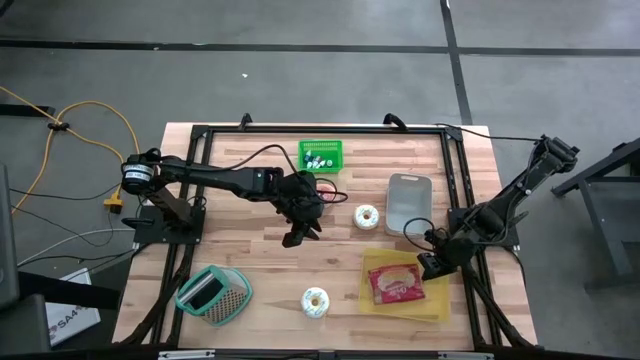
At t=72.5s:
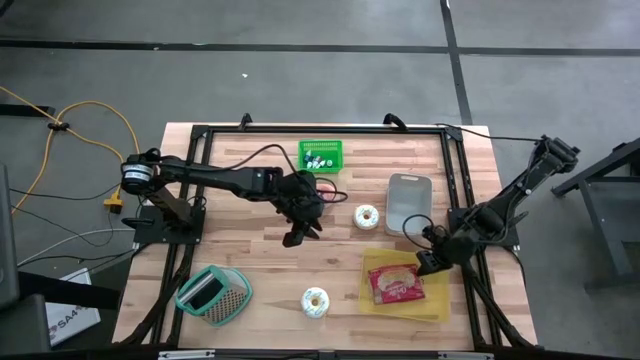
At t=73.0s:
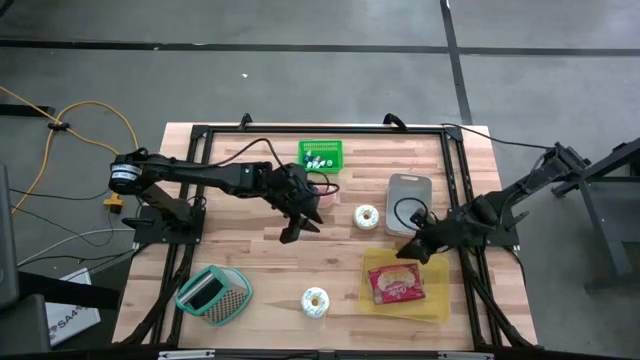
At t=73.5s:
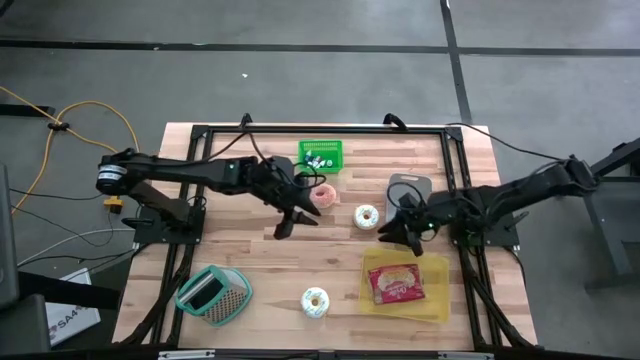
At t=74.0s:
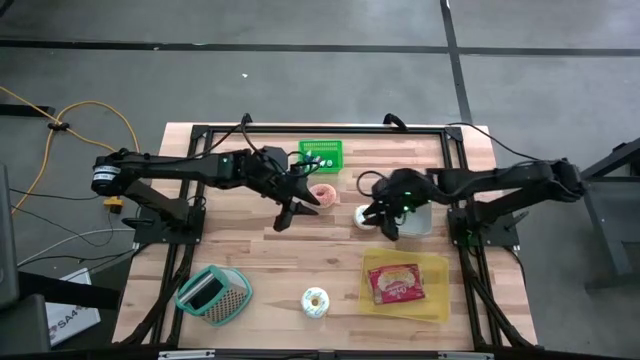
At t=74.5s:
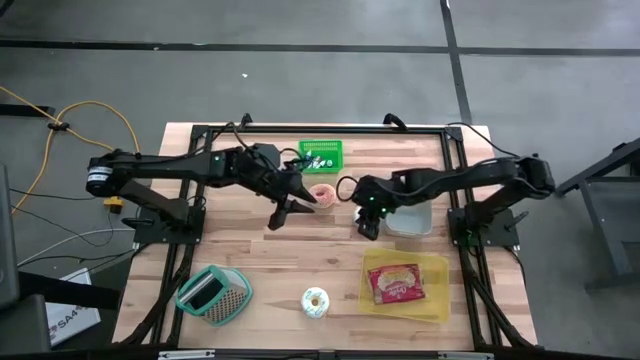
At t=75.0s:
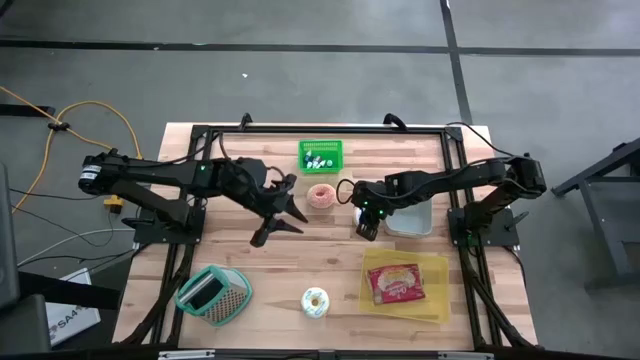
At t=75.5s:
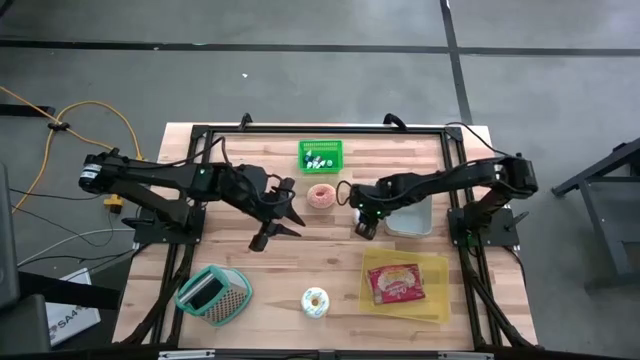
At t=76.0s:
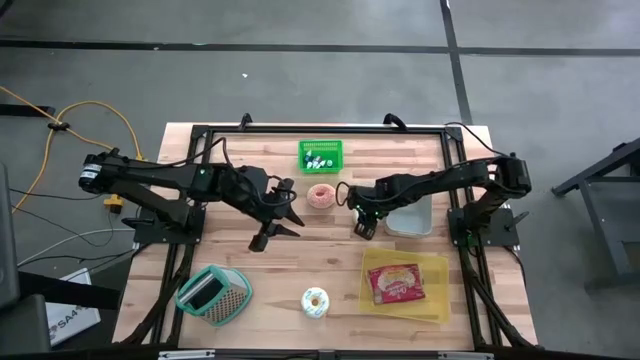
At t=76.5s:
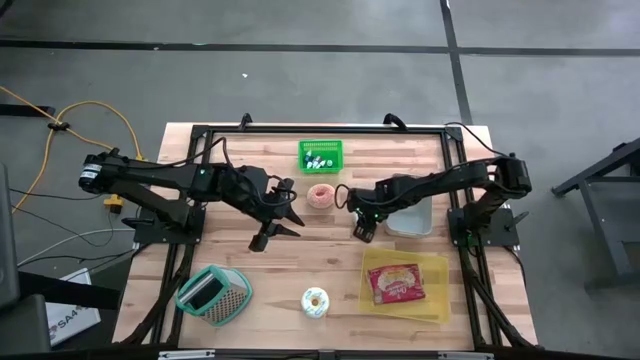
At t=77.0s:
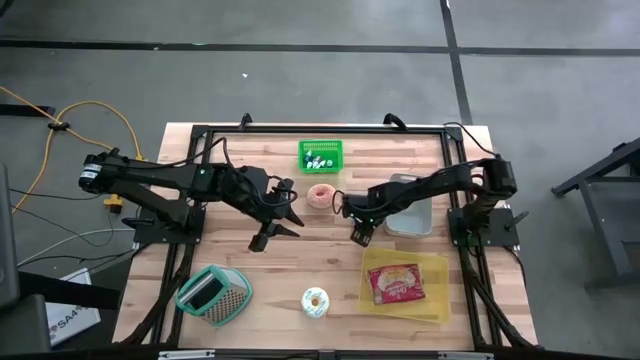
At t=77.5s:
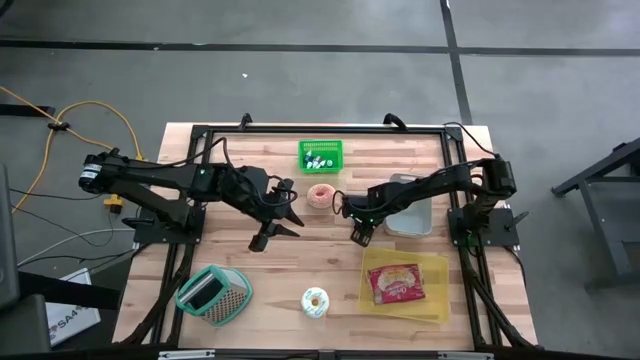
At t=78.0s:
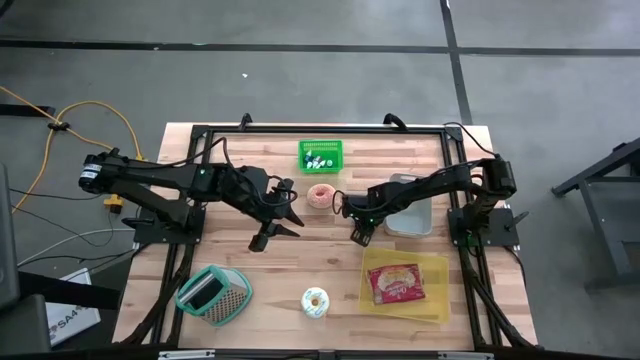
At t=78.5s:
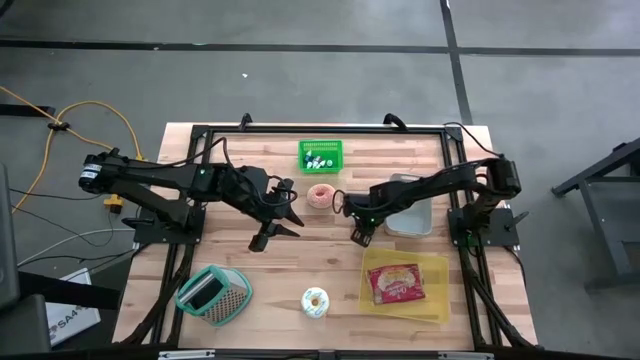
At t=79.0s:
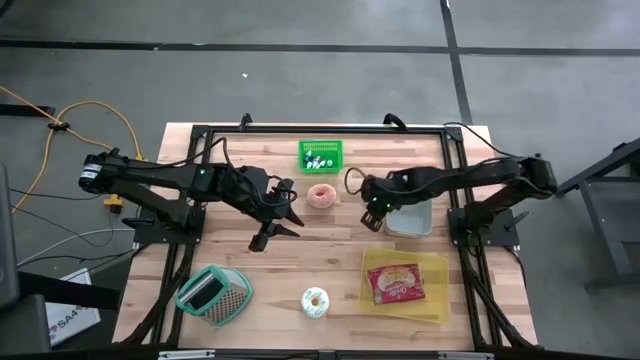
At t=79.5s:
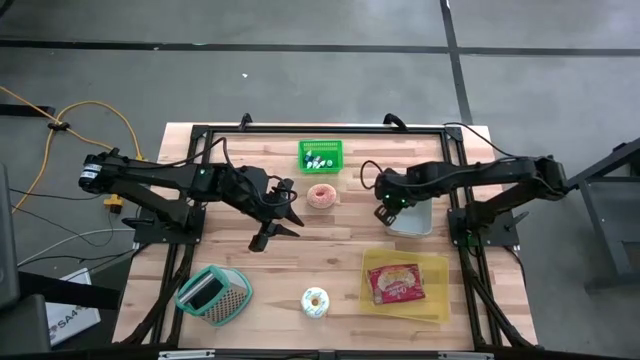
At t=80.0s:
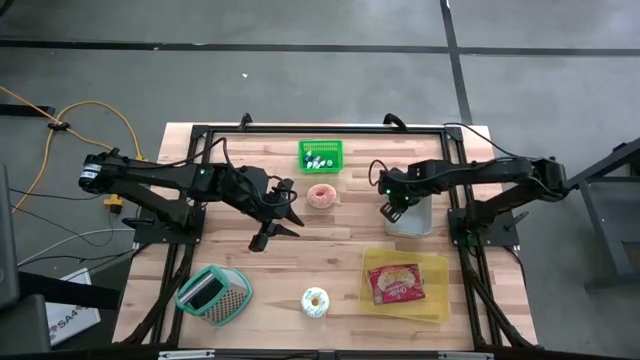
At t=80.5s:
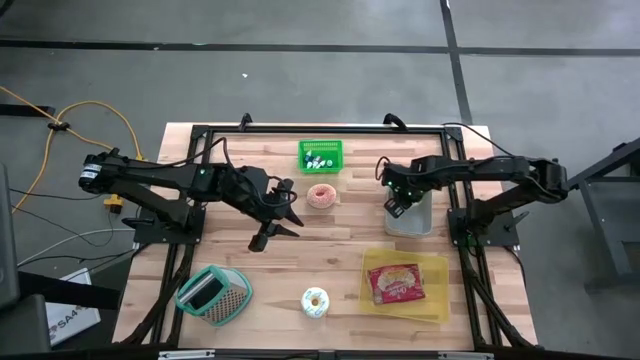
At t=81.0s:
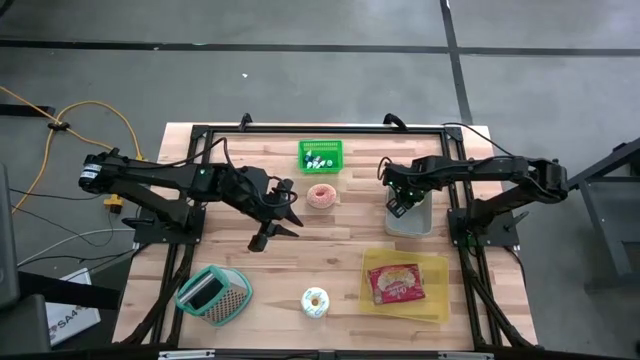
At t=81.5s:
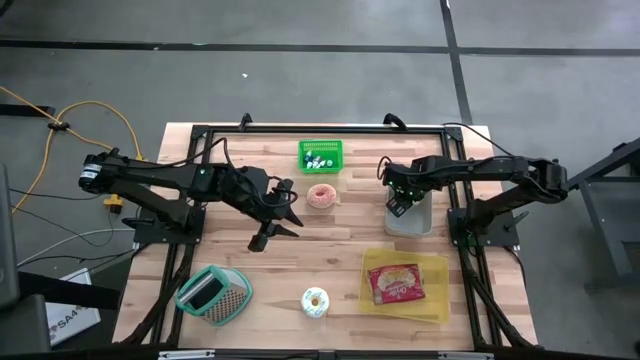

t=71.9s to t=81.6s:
Put the top white donut into the gray bin

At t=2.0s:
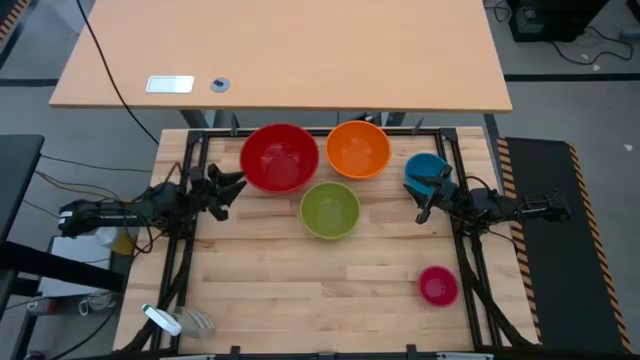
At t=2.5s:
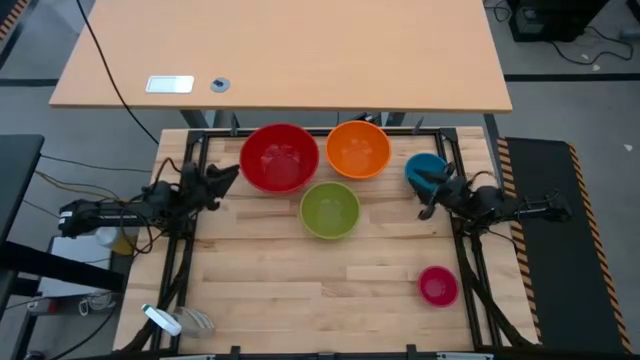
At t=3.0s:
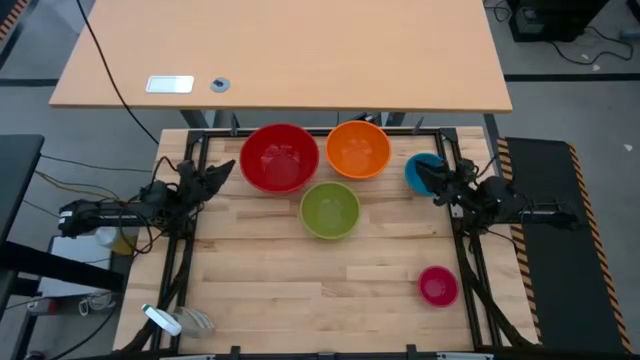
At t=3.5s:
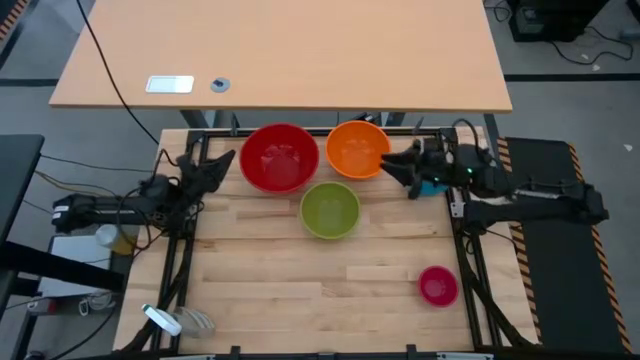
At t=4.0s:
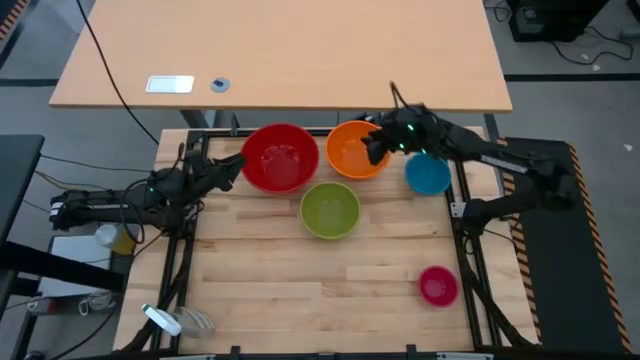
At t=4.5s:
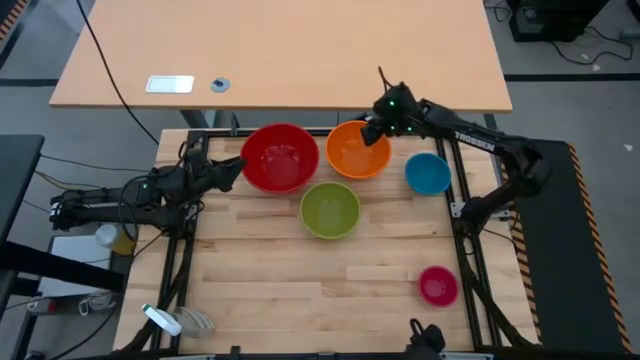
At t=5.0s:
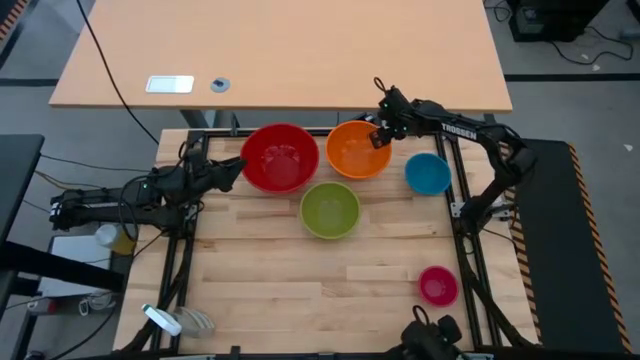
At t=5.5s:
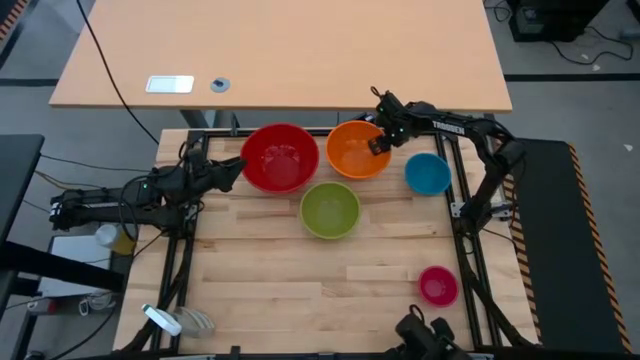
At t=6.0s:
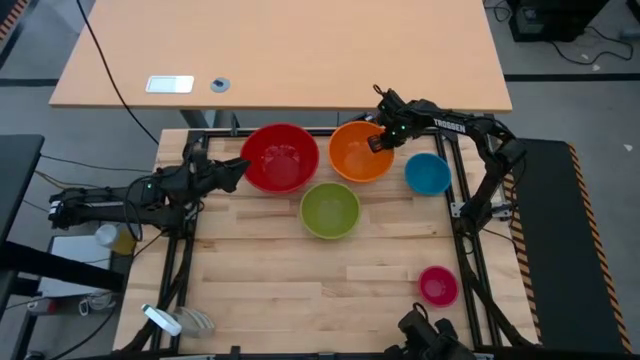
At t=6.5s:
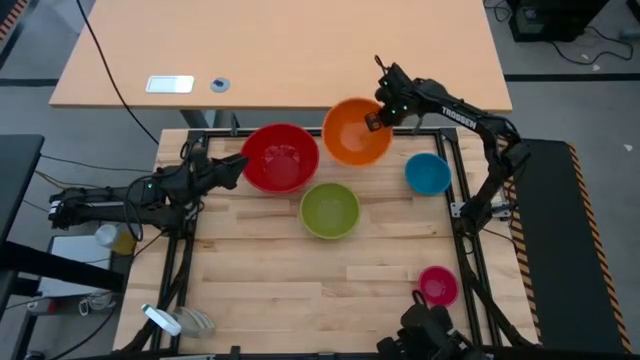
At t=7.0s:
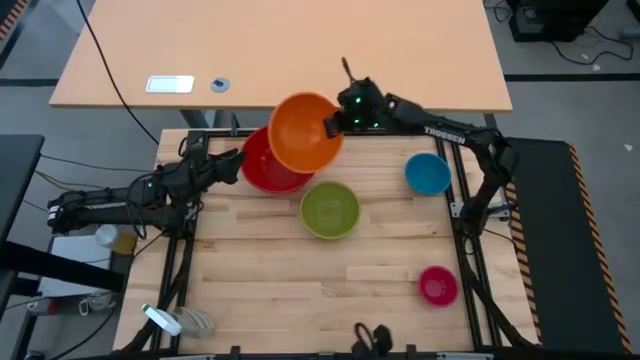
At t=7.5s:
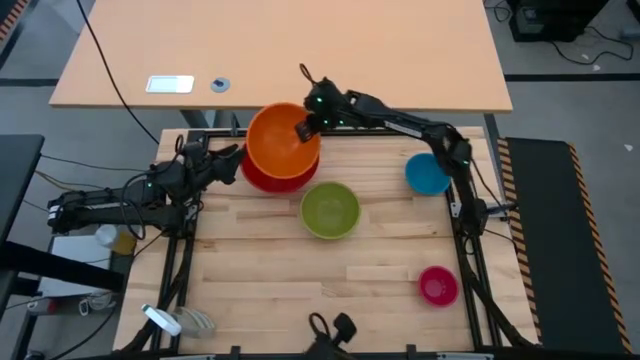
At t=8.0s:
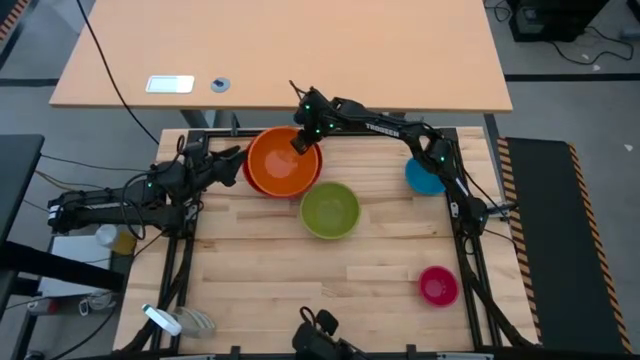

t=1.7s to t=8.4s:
Stack the orange bowl on top of the red bowl

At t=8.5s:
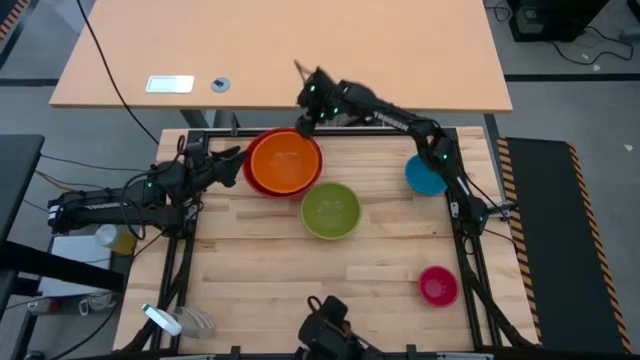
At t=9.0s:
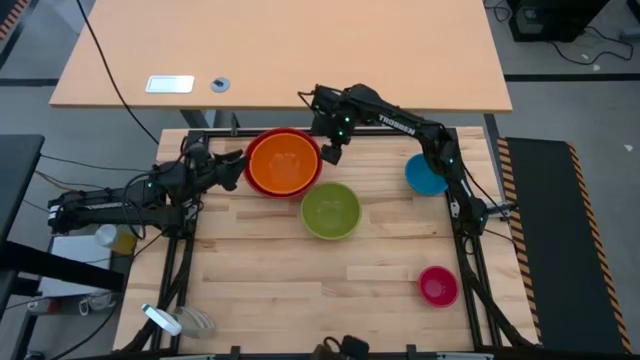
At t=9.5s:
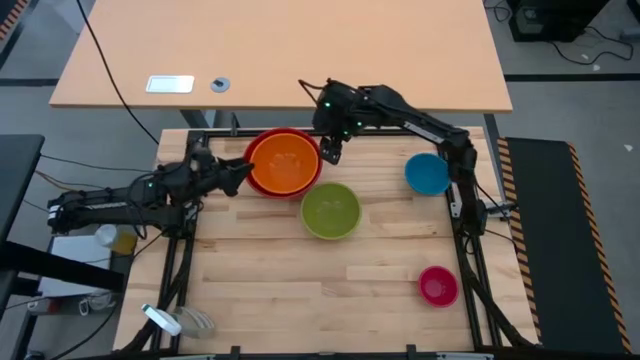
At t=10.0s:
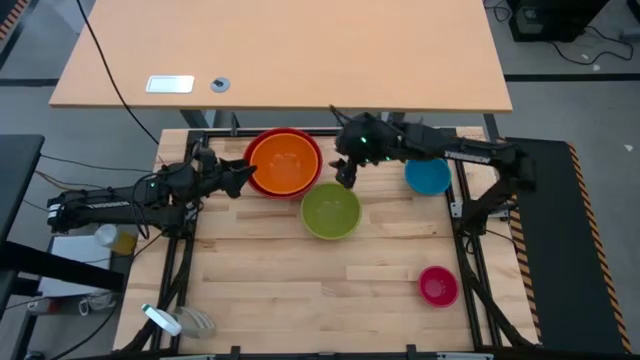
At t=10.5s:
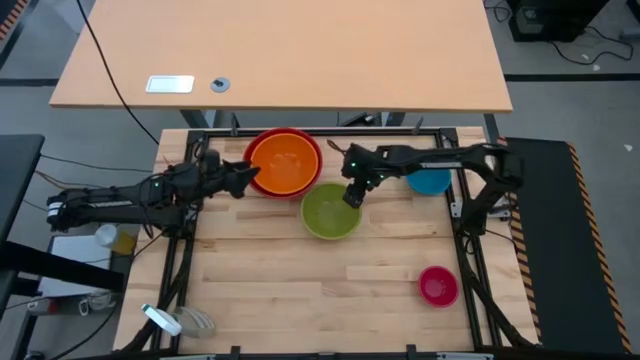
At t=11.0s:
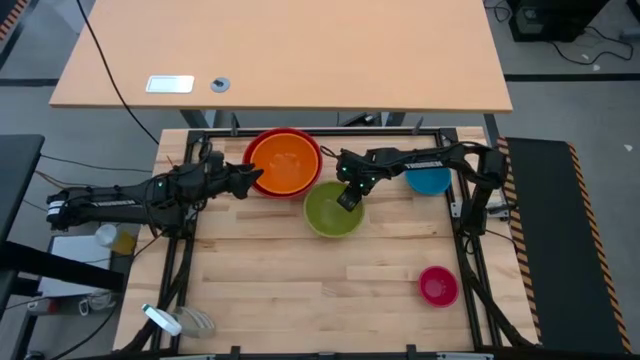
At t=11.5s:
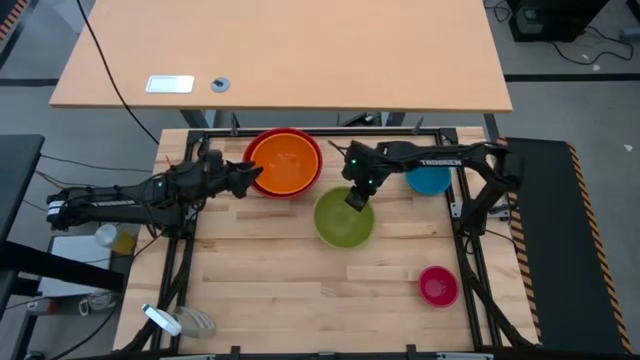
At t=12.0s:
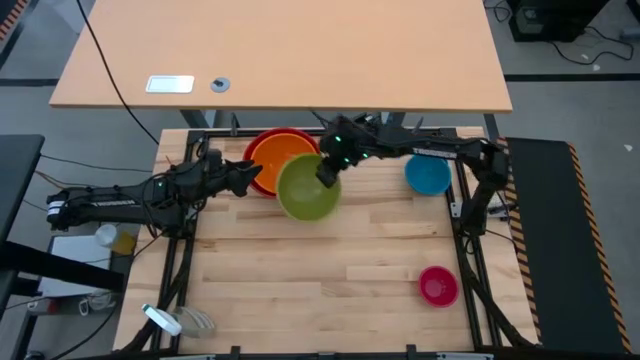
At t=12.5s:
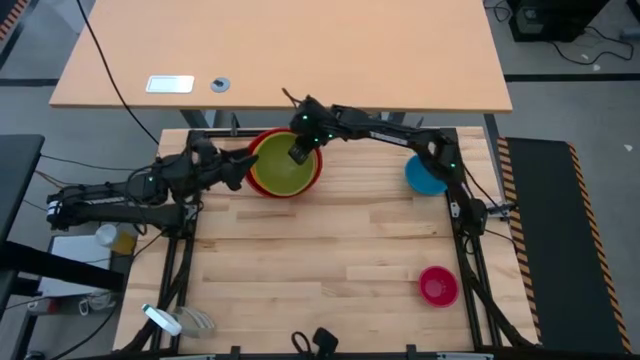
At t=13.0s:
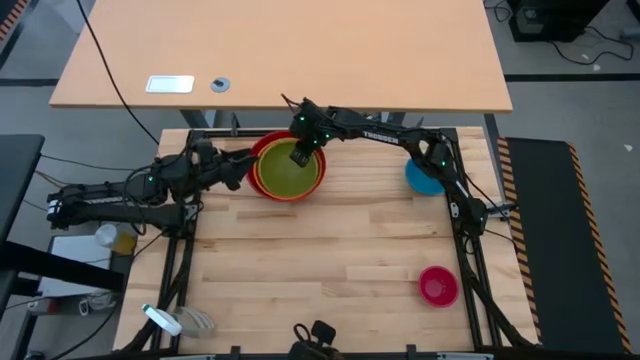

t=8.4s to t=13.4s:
Stack the green bowl on top of the orange bowl
